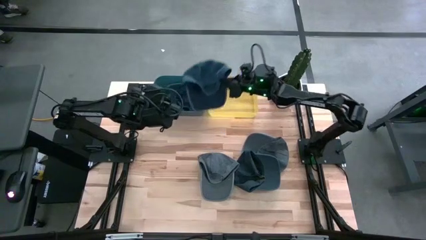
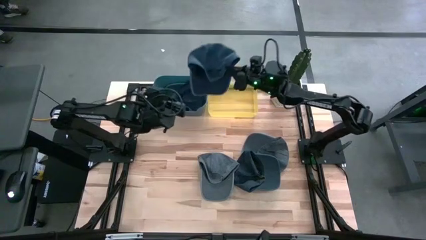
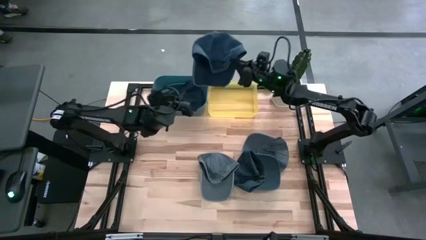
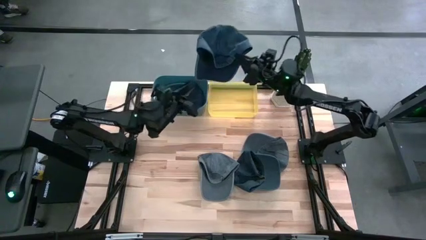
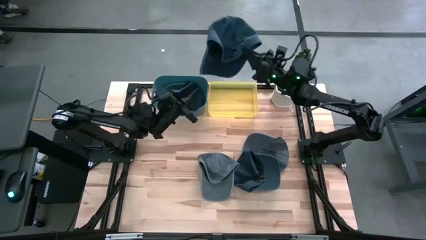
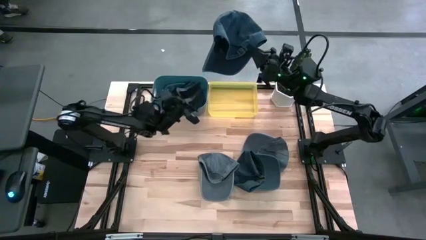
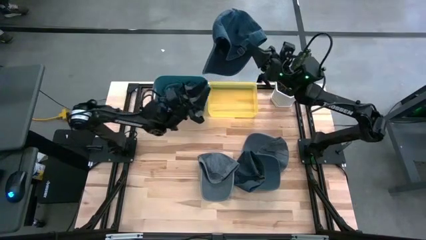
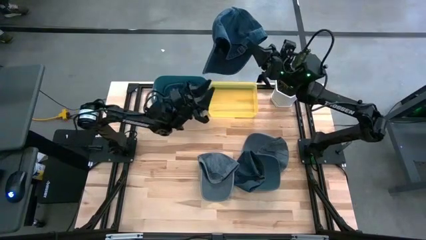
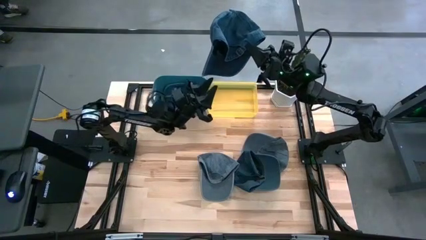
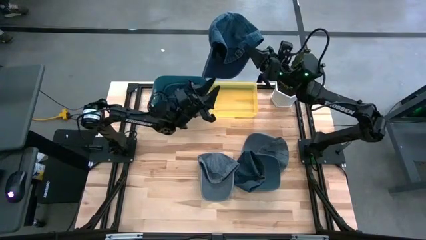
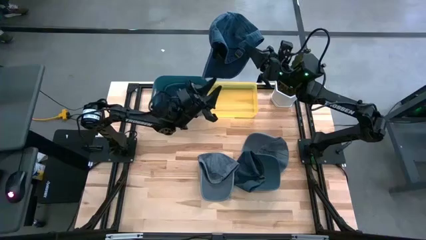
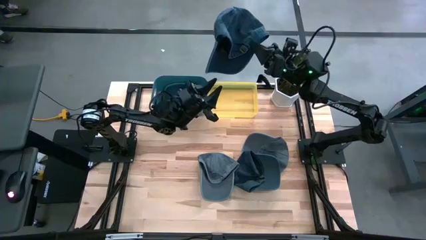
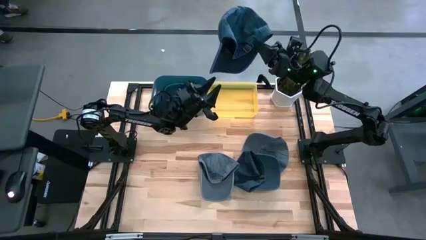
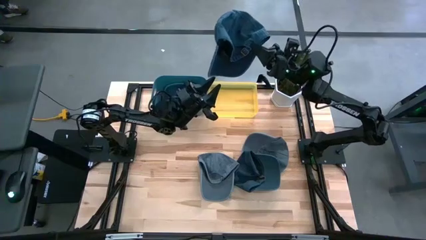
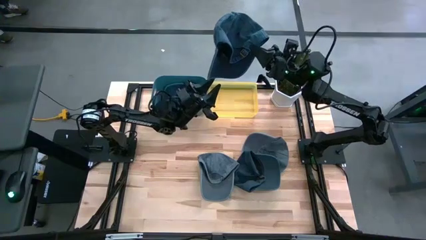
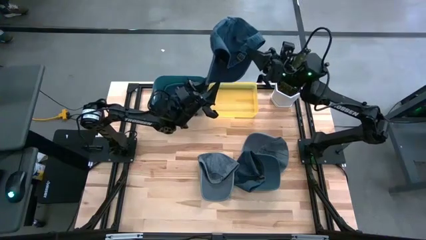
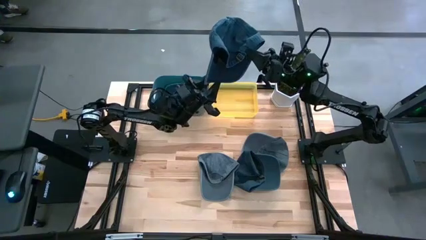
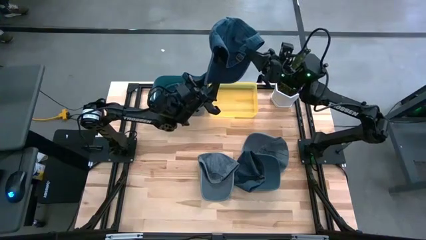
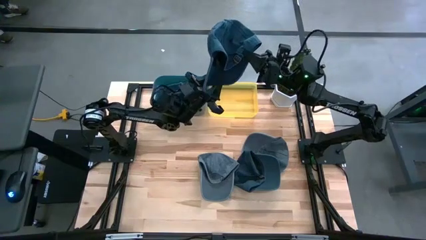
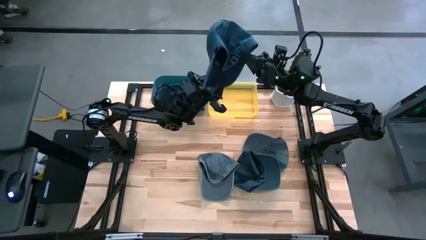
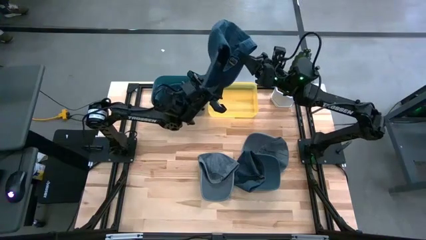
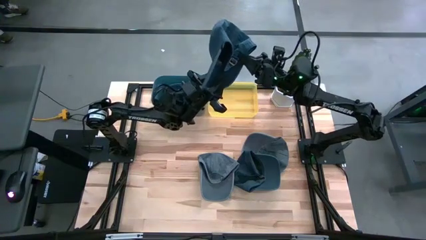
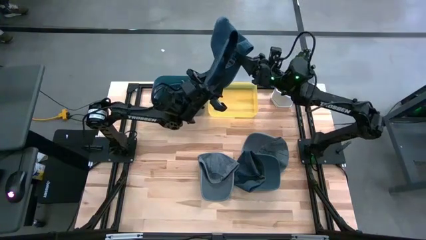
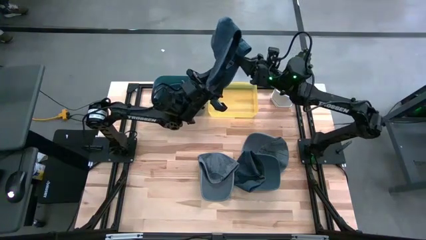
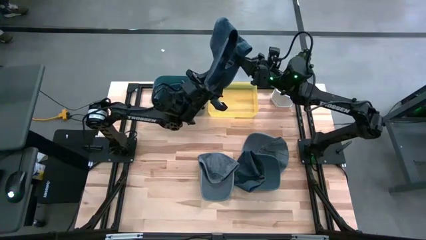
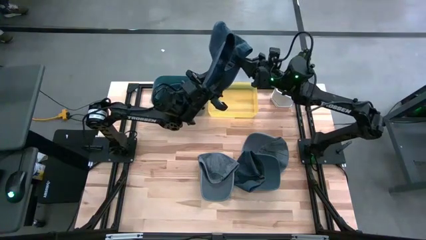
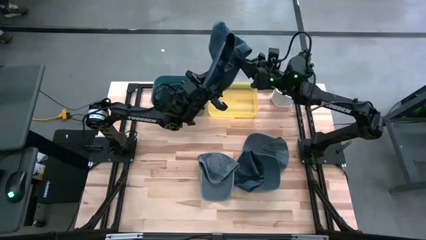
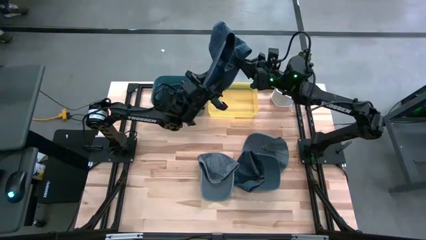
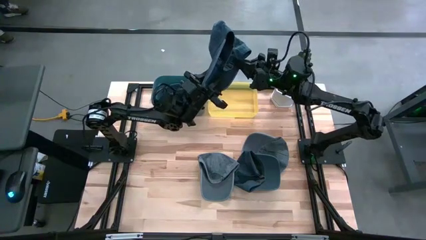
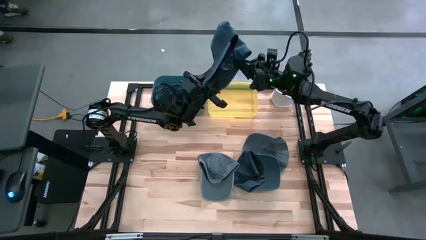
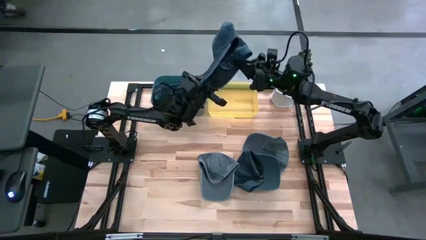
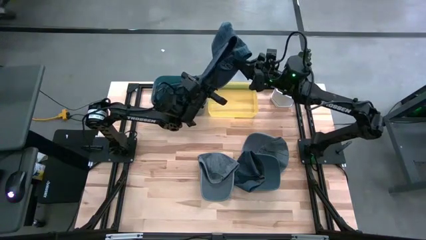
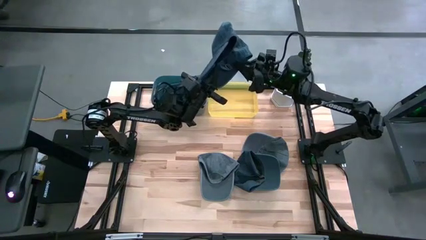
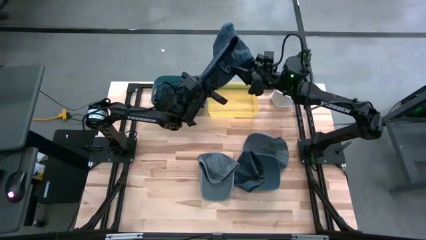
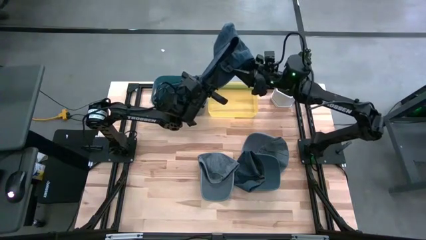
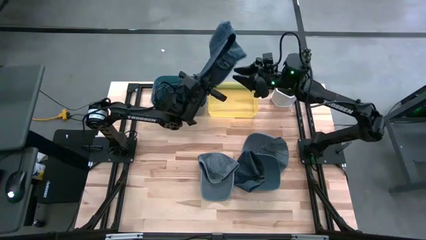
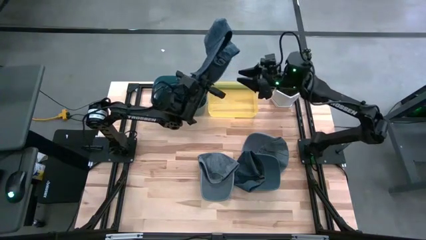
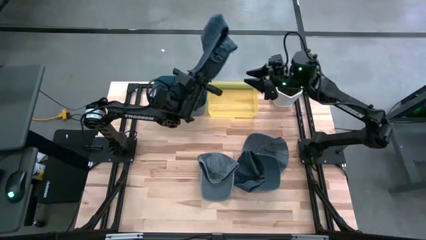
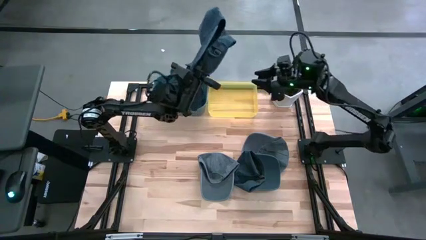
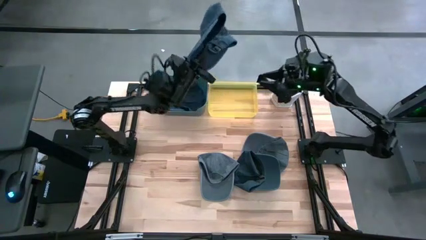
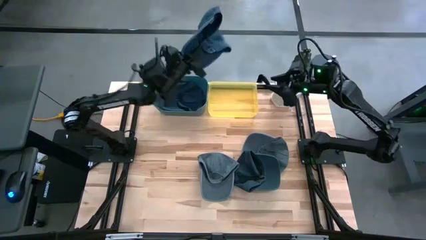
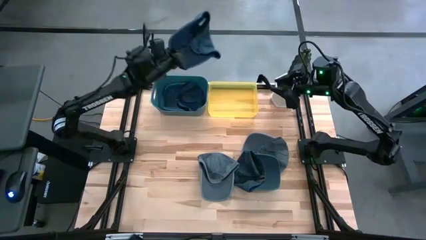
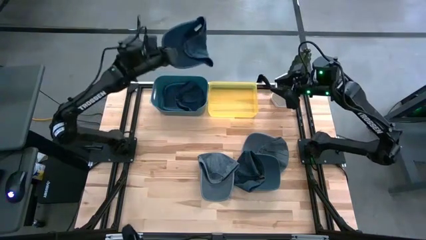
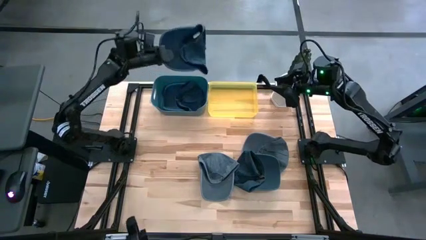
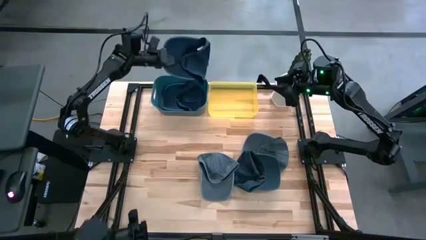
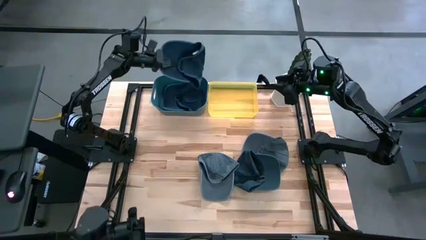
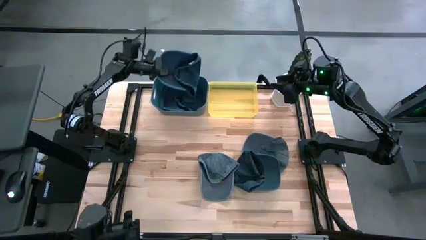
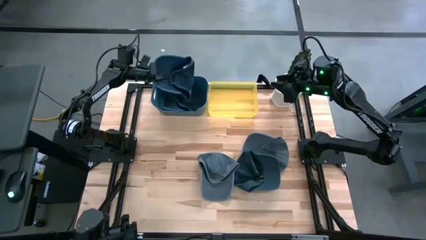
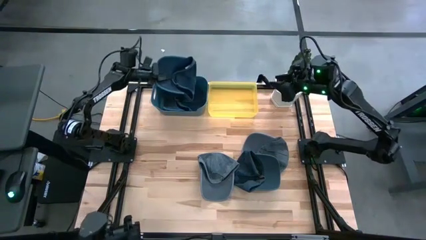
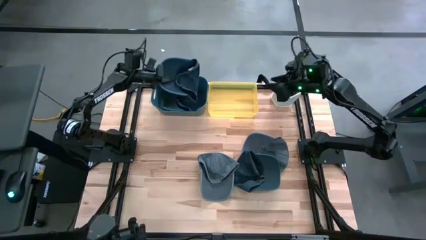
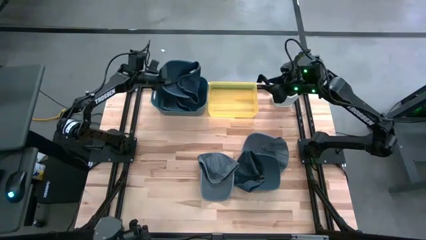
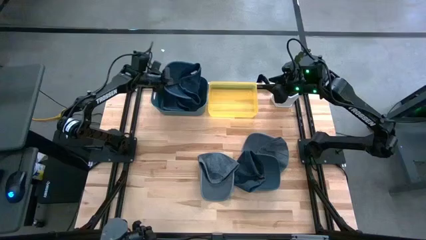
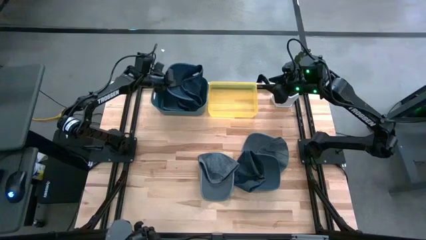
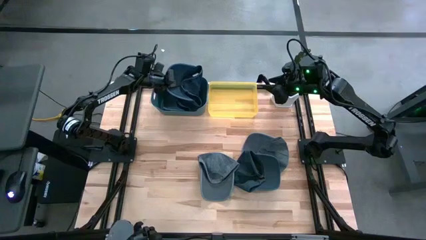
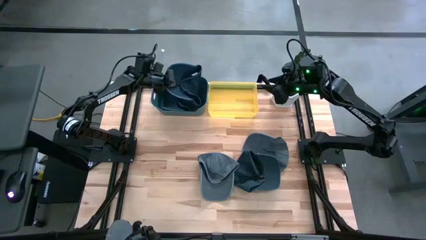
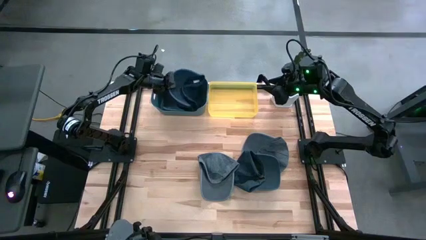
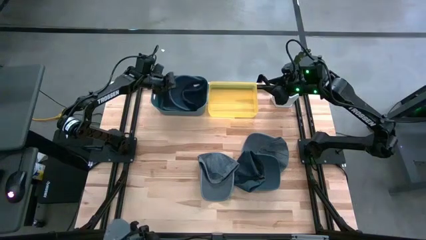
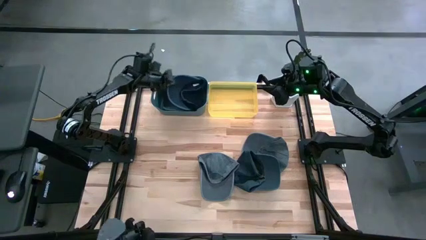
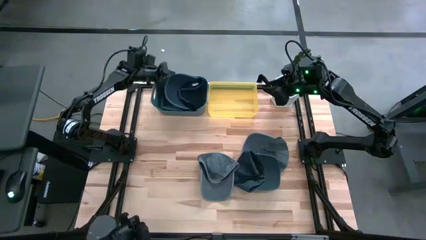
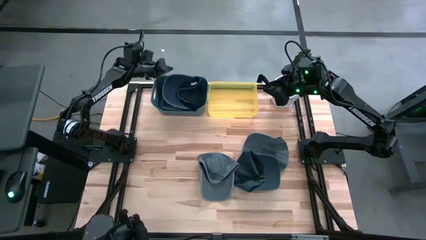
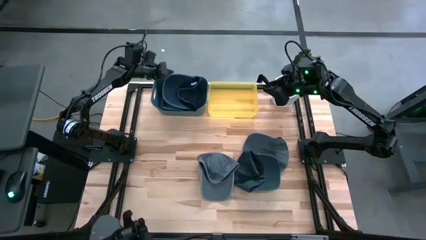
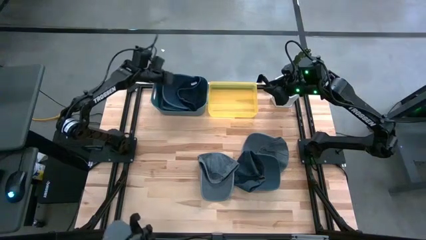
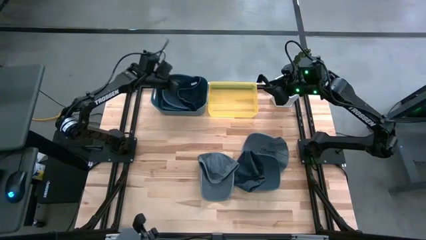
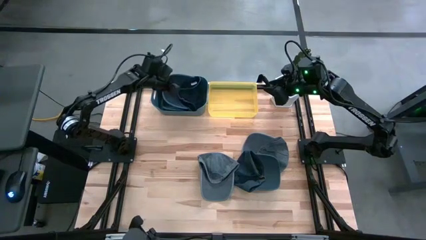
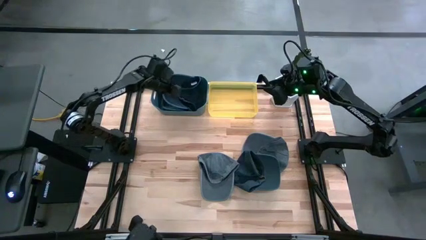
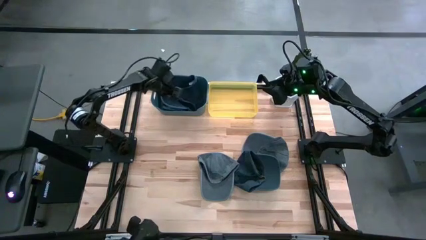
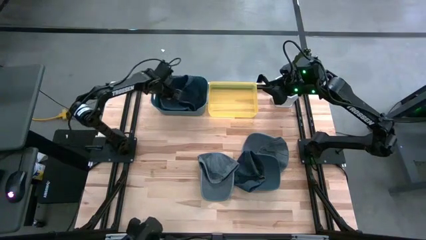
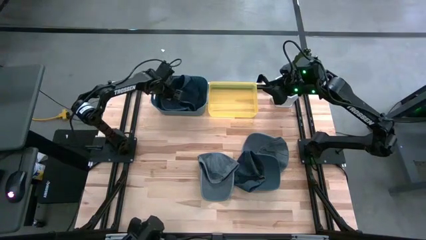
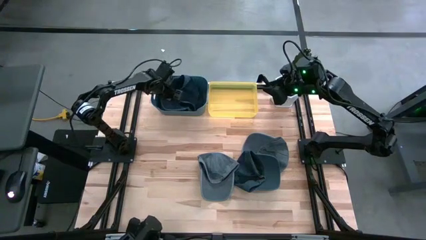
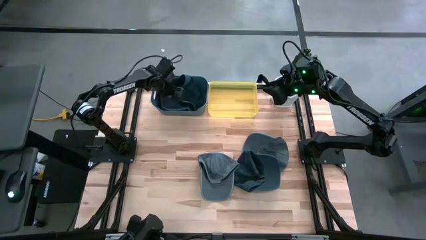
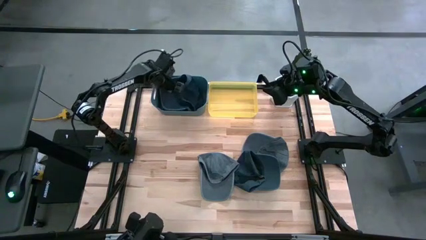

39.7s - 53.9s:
Task: Pick & Place hat
Put the top blue cap into the blue bin

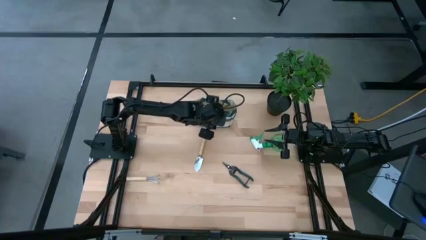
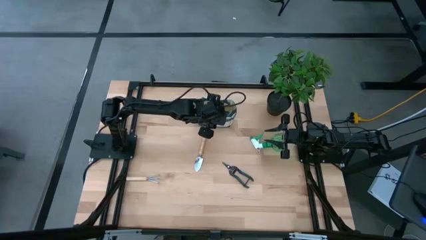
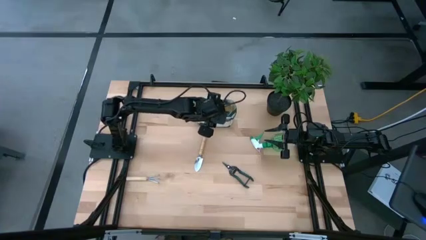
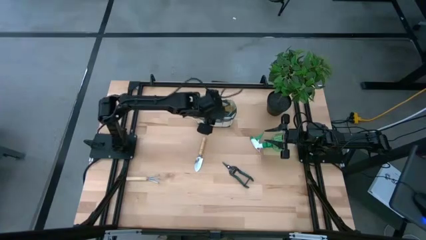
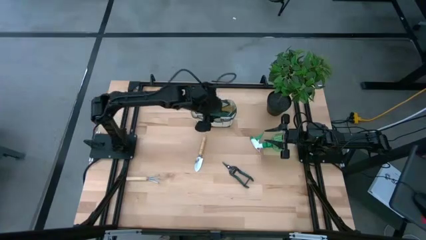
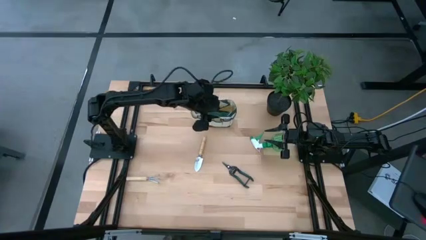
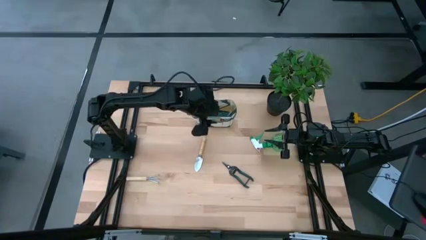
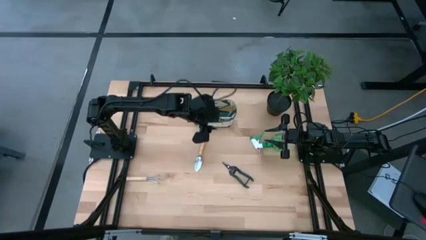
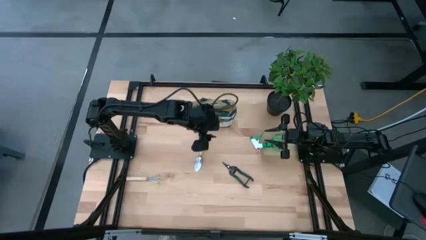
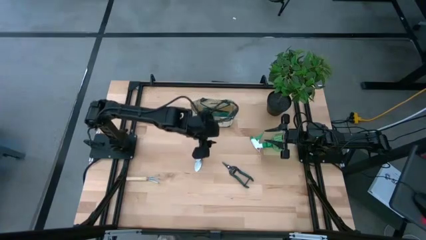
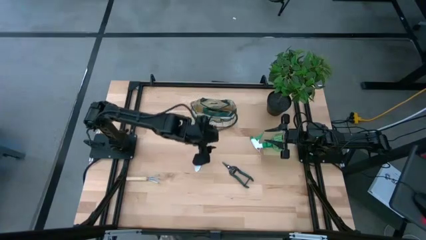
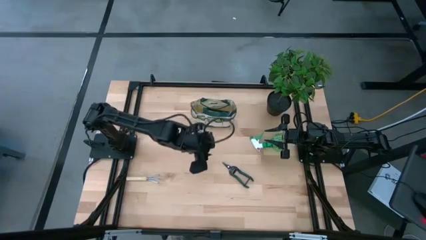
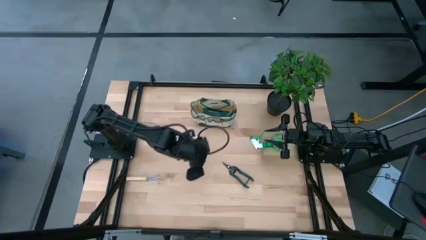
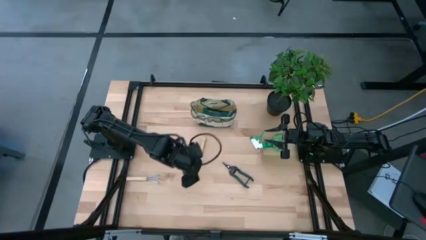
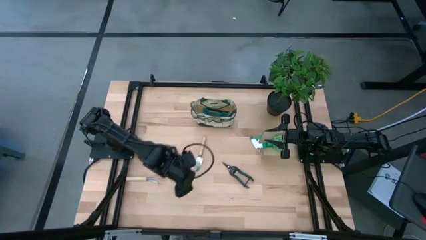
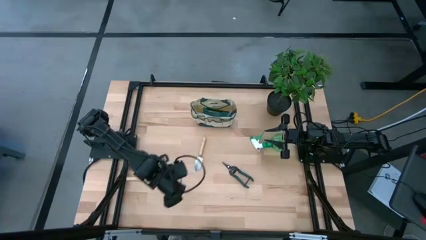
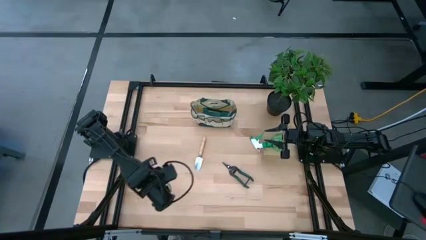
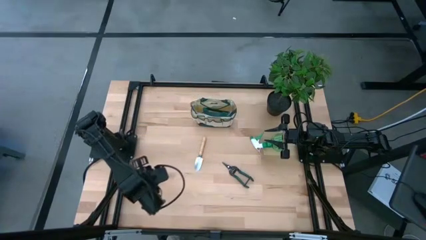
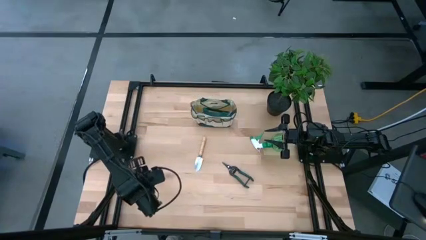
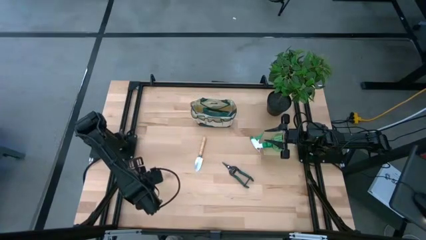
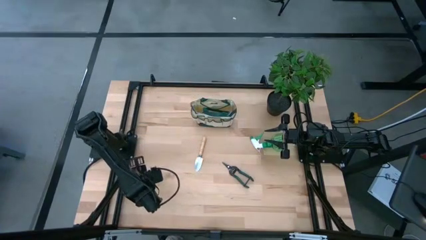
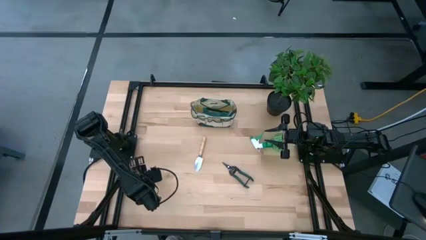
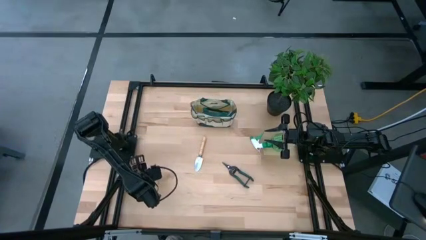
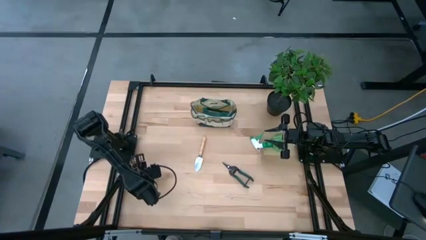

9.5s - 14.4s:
Task: Pick & Place Garden tools in Gardening bag
Put the brown hand rake into the light brown gardening bag
